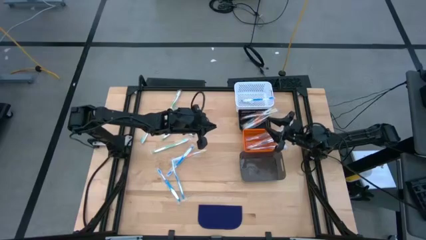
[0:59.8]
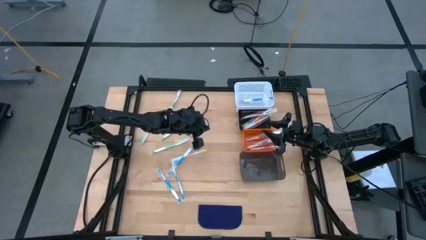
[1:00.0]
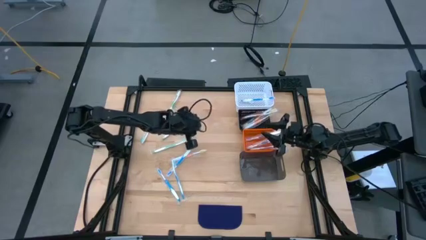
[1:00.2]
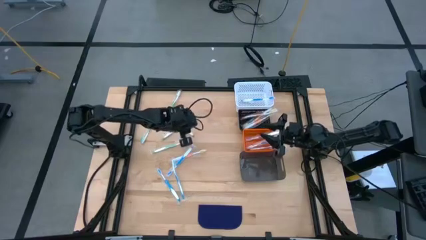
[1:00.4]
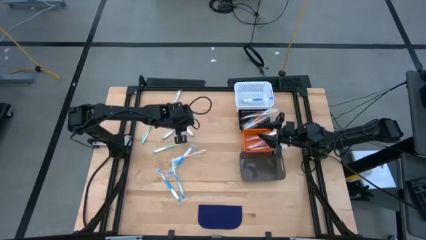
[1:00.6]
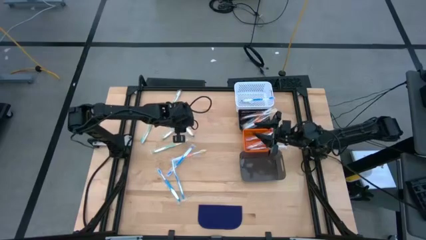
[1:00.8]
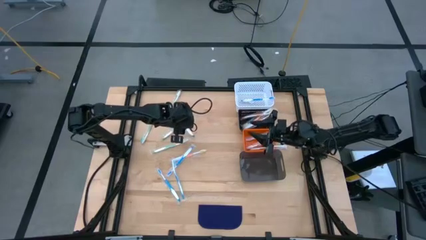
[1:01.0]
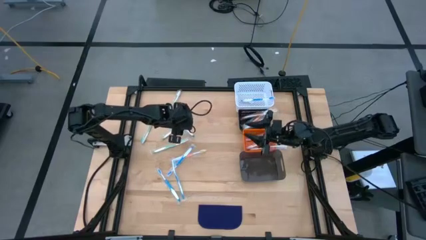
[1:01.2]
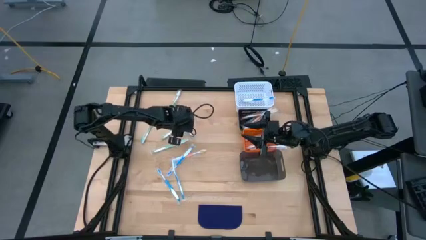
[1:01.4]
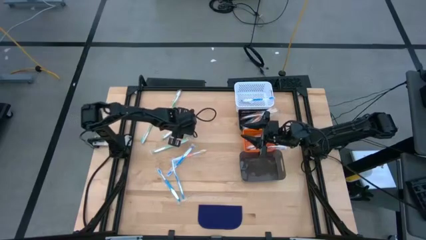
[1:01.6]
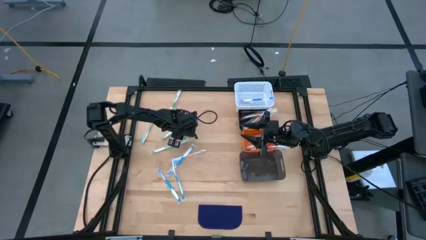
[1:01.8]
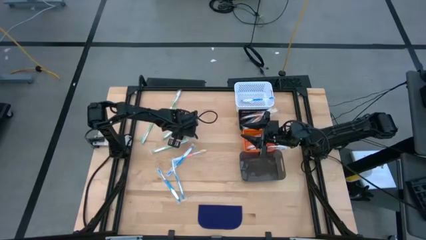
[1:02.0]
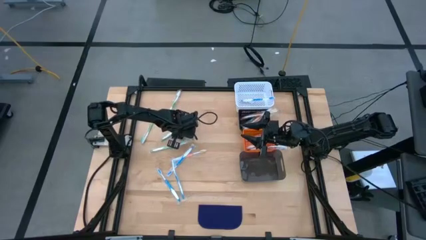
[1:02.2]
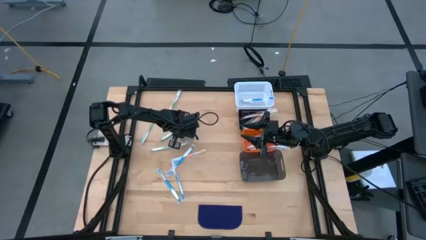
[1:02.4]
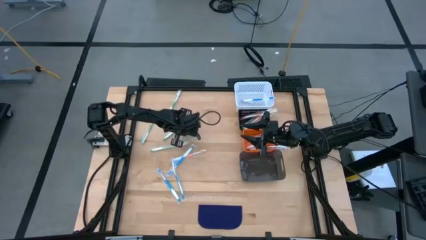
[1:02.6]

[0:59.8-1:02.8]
Task: Pick & Place Toothbrushes
Put the purple toothbrush into the orange bin

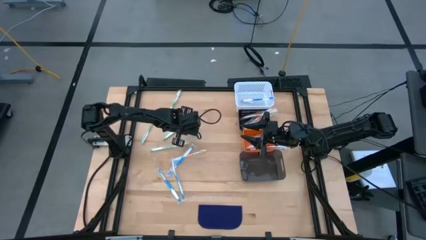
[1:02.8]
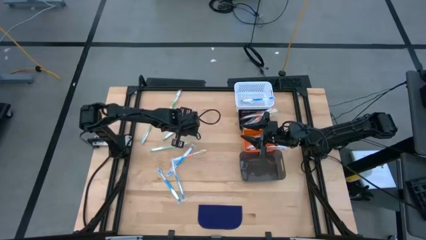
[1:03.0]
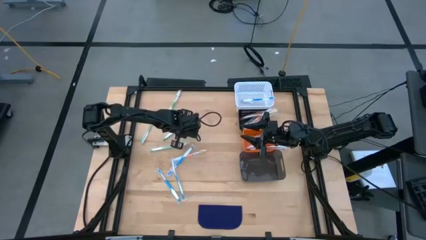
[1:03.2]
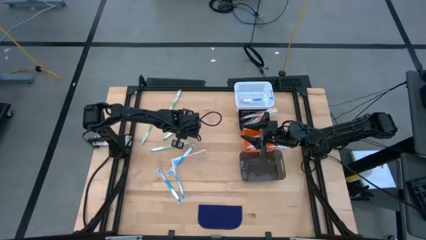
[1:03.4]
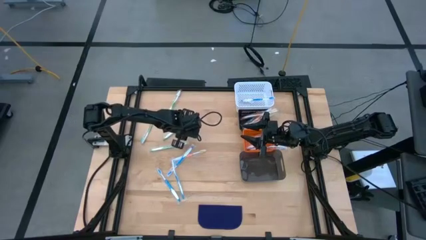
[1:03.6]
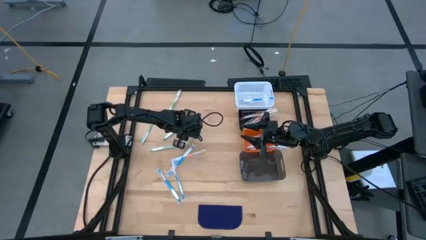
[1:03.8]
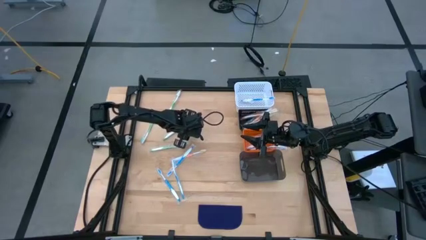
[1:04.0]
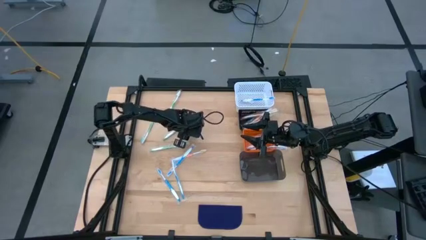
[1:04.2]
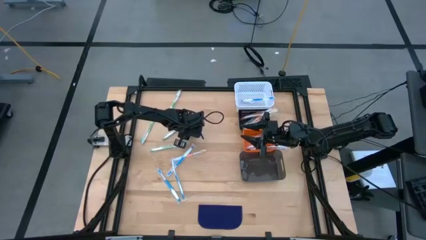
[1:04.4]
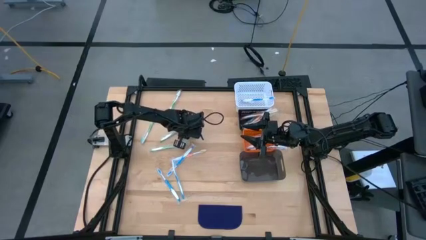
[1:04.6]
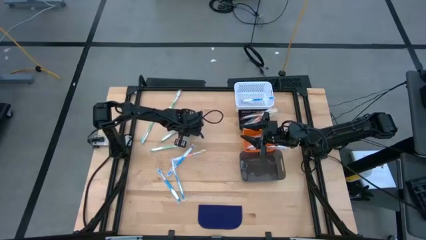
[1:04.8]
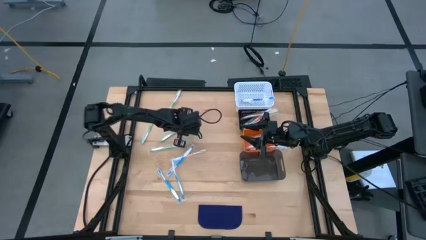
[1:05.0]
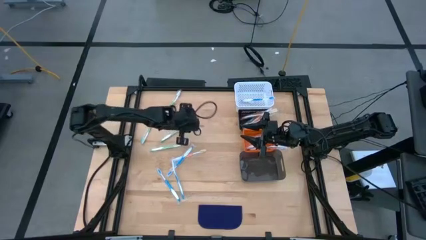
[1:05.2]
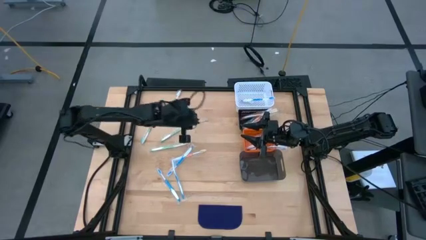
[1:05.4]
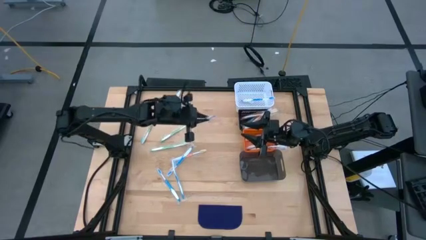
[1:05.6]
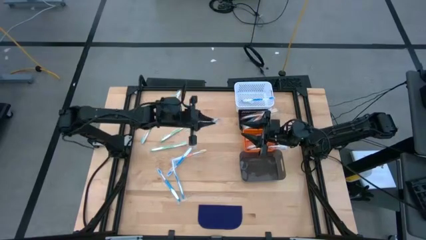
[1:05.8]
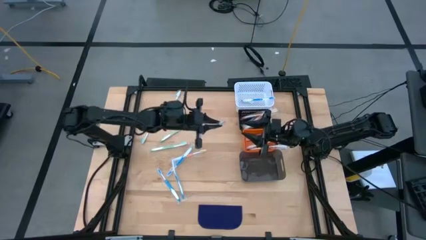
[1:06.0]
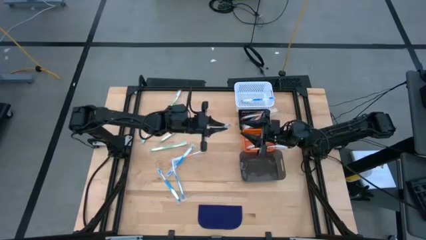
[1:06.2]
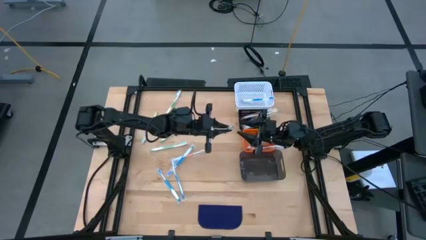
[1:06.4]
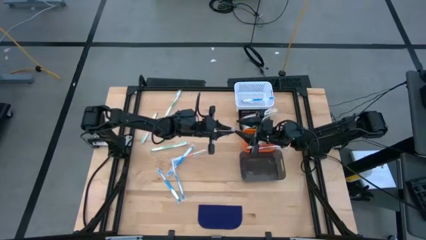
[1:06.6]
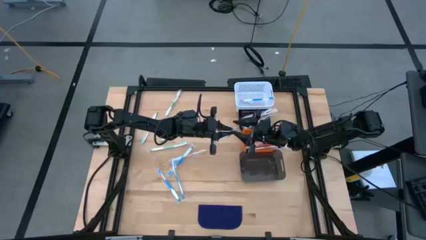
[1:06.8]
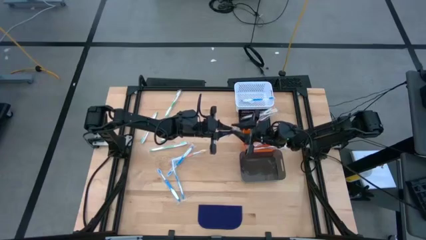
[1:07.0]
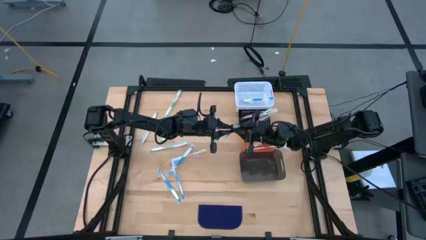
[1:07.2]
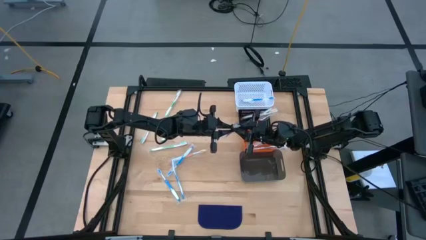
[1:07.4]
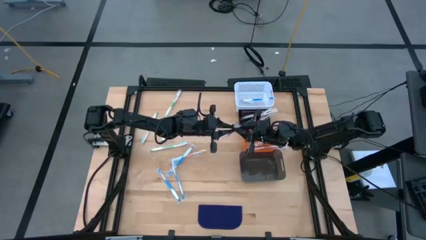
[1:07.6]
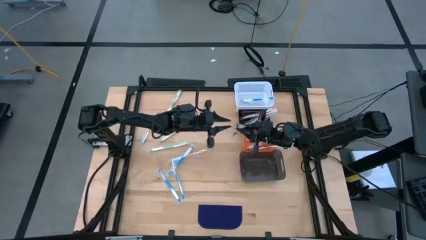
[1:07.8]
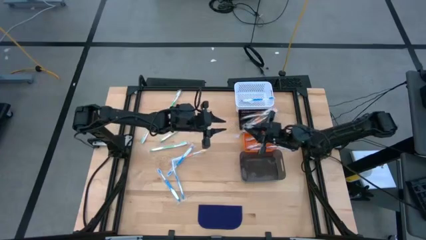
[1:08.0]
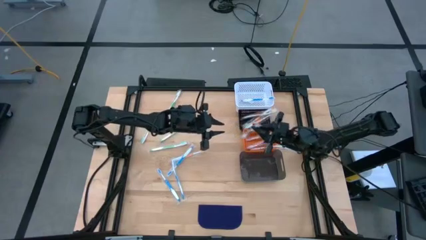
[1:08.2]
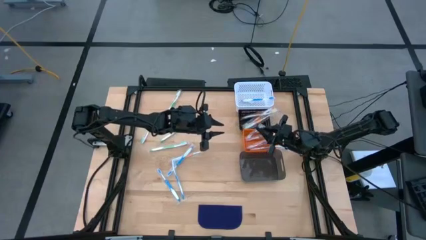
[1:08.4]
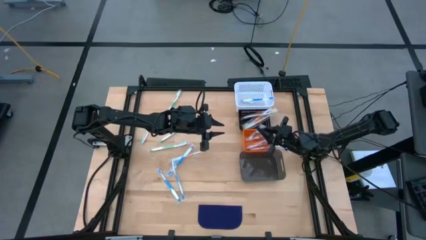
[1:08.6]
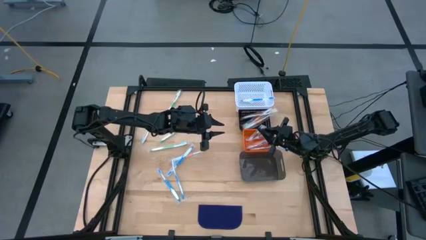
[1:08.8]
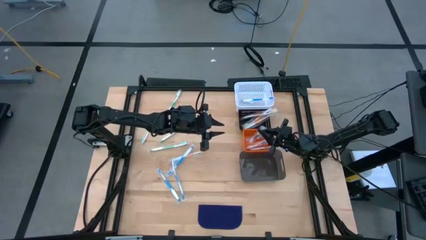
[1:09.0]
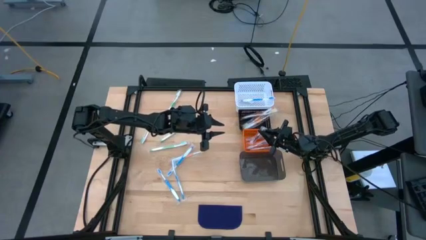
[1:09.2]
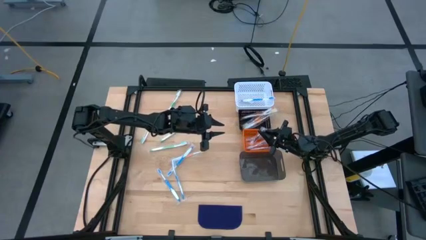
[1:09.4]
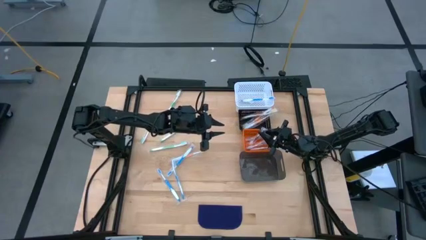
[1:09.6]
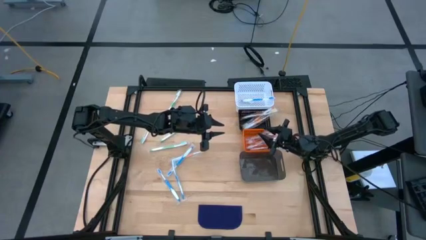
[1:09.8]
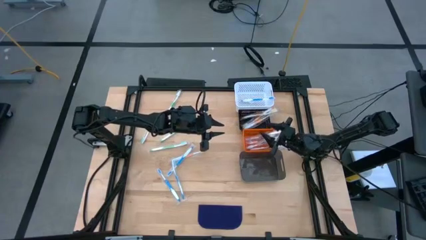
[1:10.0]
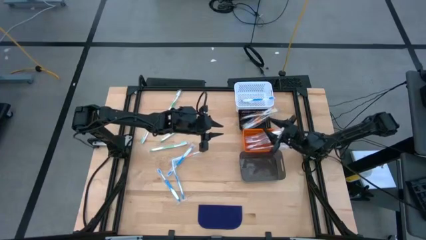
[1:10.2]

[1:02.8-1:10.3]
Put the purple toothbrush into the orange bin

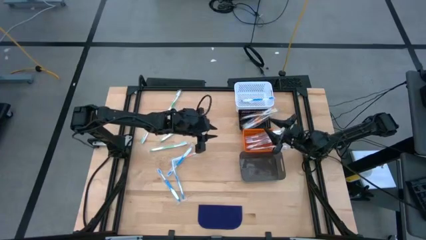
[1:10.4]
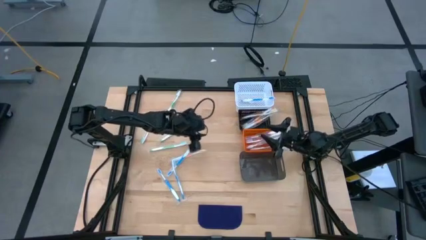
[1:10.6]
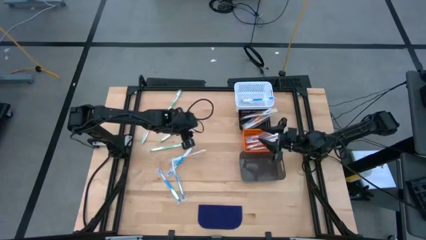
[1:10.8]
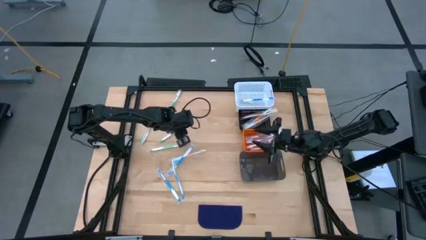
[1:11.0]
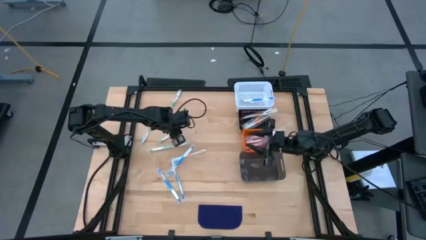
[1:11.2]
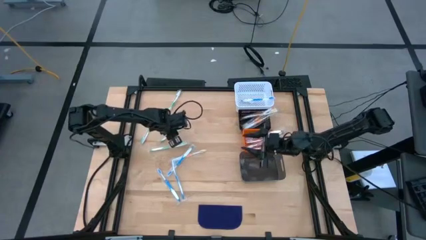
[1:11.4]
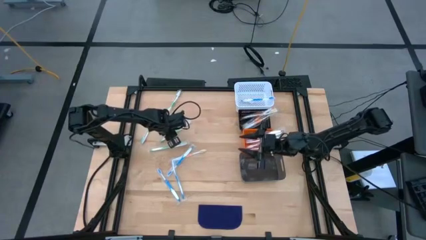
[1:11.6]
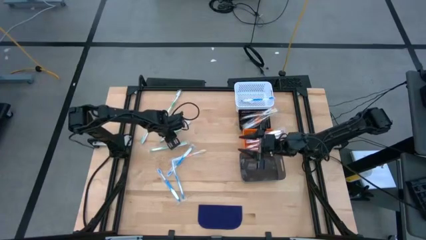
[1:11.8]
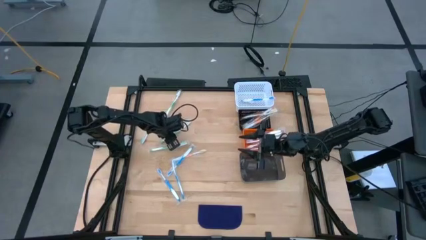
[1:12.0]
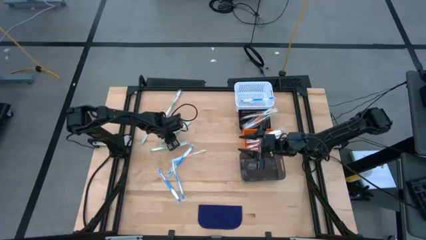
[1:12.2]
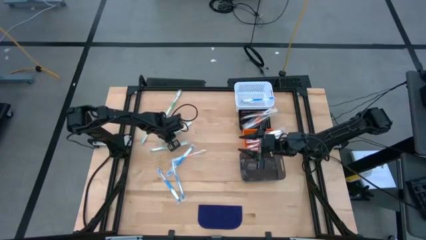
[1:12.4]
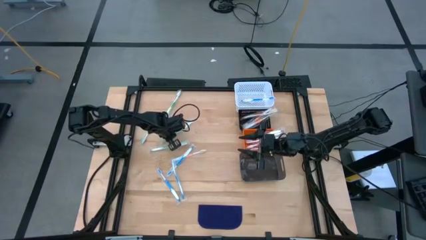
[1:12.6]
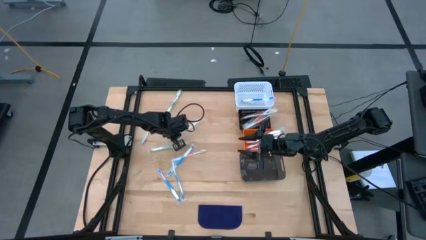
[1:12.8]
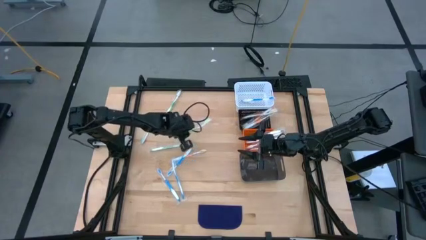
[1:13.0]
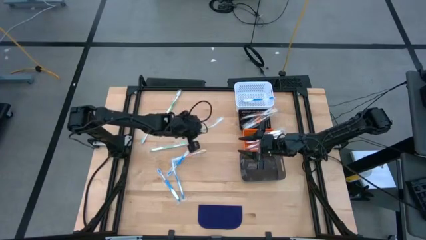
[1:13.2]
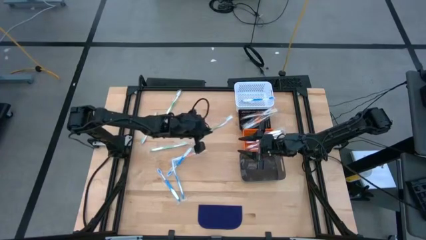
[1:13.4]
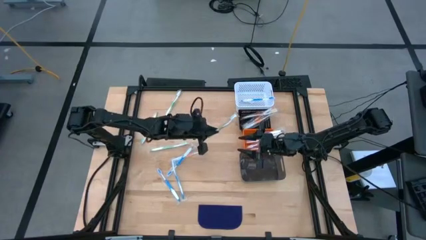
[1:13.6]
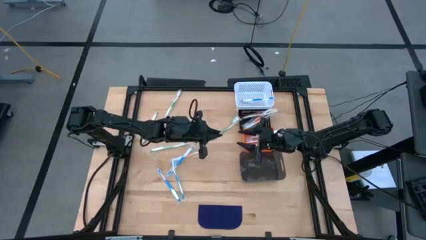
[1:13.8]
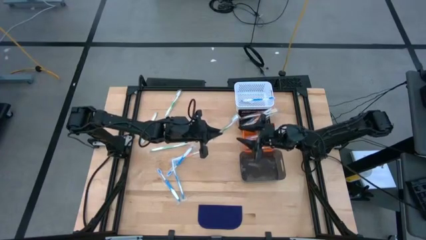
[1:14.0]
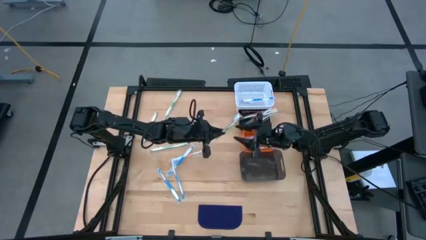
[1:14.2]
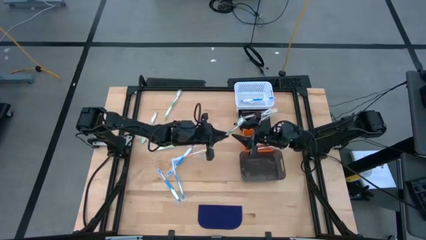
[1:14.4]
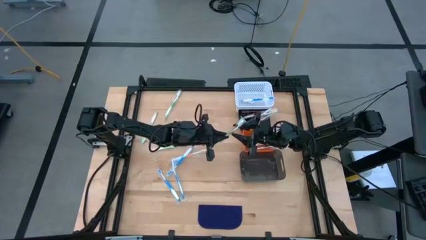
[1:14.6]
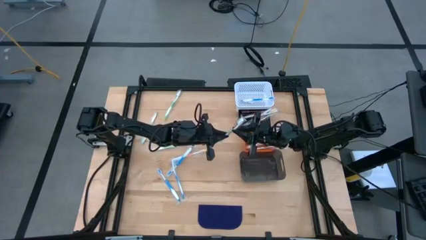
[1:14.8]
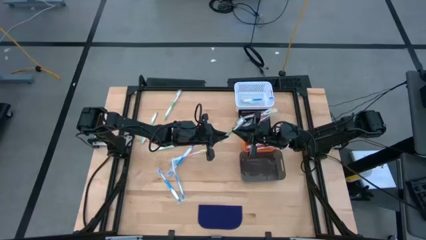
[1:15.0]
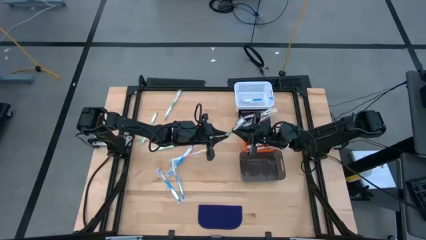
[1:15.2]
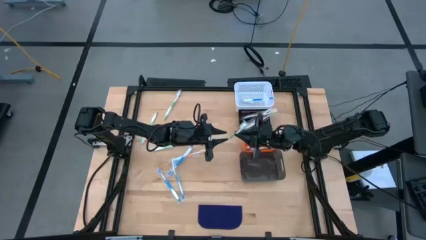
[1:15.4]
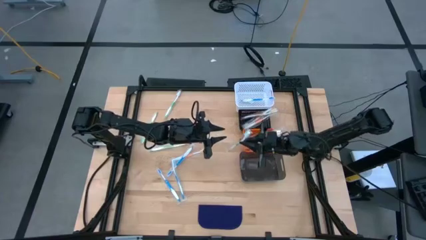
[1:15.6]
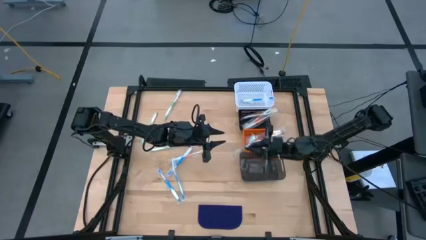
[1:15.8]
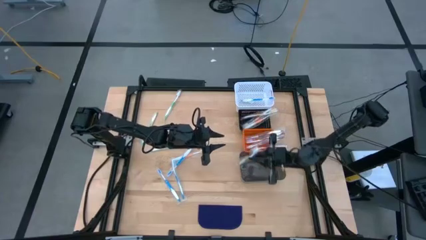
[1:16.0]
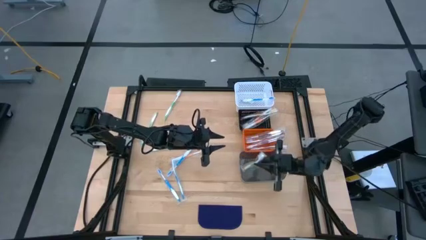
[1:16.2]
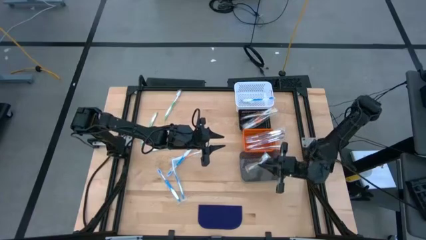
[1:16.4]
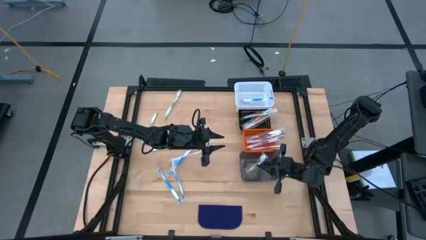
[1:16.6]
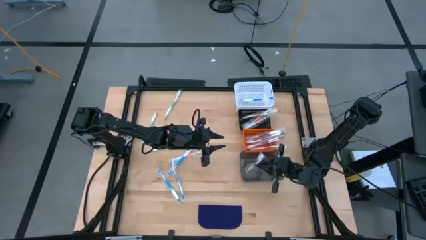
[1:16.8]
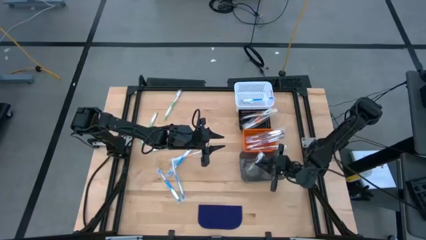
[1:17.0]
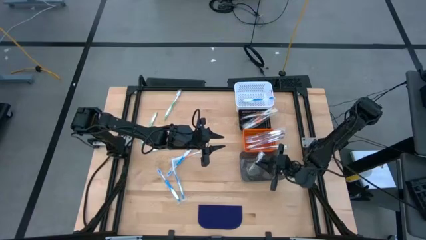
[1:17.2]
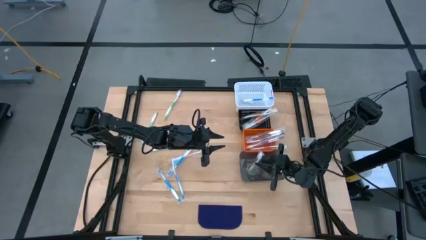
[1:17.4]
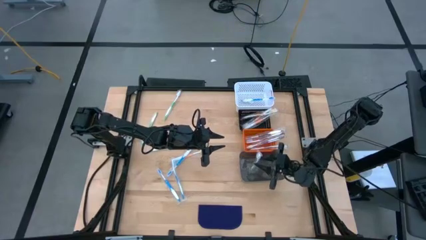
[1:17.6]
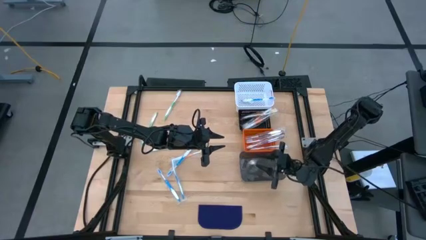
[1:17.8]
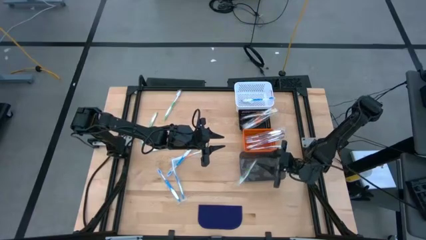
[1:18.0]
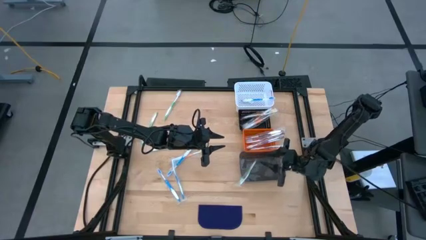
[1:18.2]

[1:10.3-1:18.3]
Put the green toothbrush into the black transparent bin
